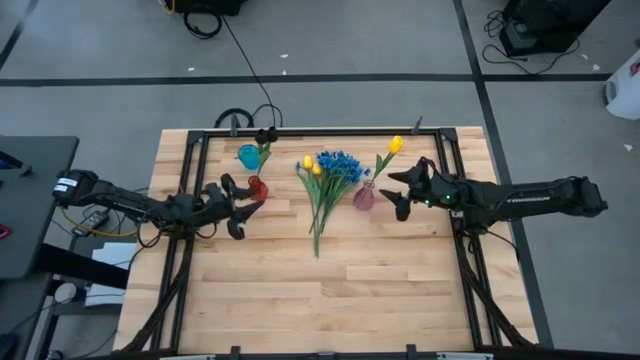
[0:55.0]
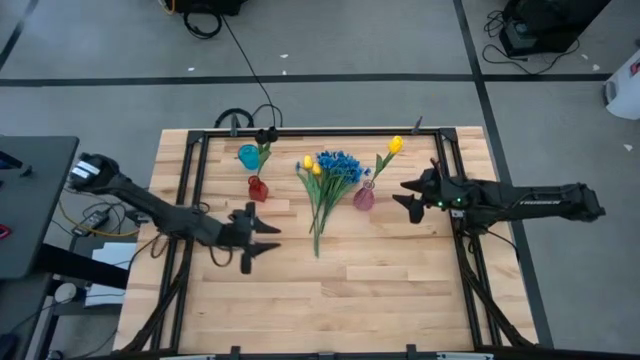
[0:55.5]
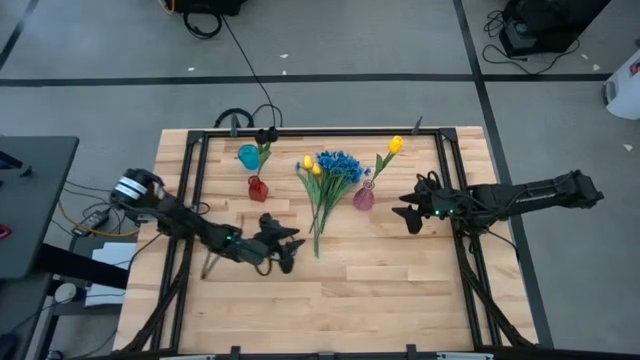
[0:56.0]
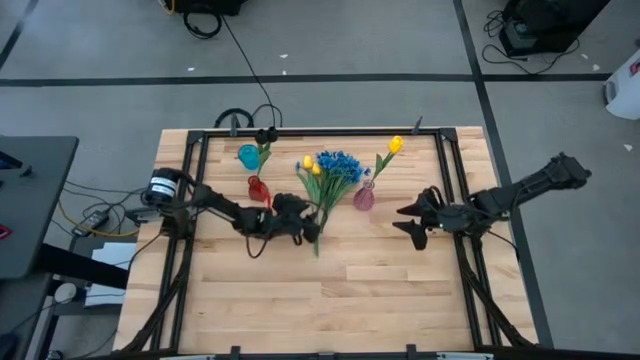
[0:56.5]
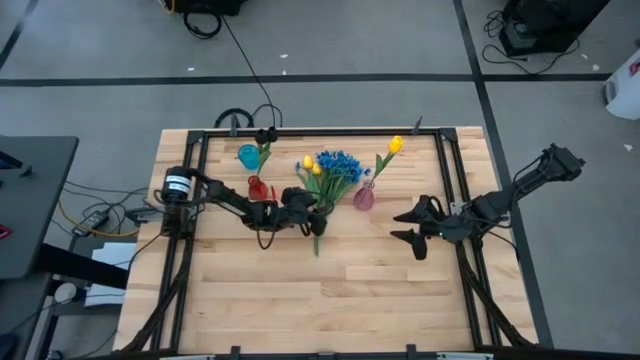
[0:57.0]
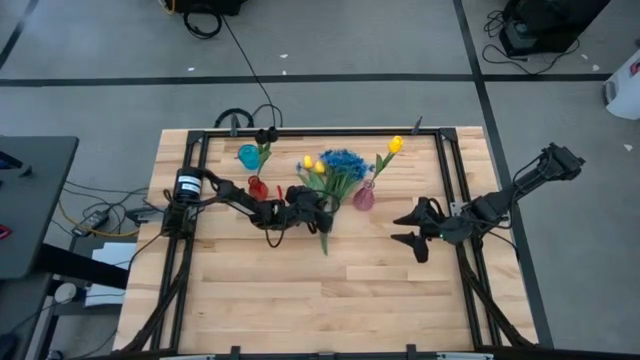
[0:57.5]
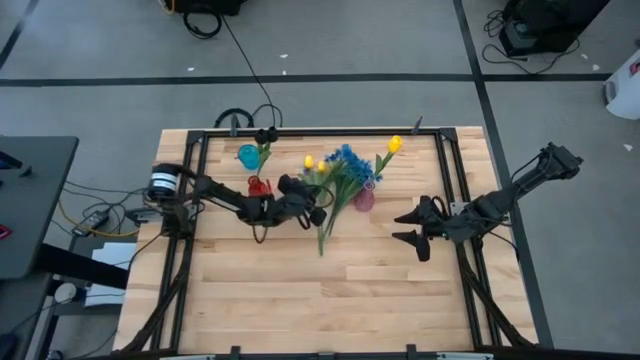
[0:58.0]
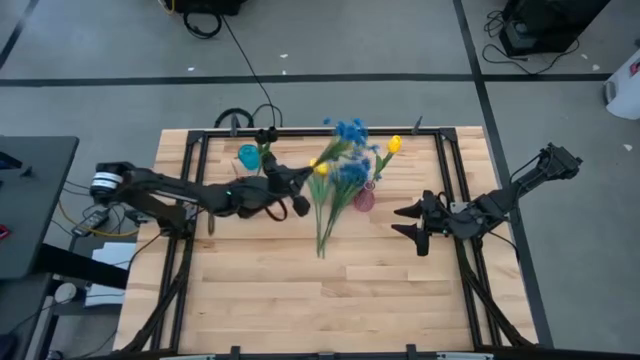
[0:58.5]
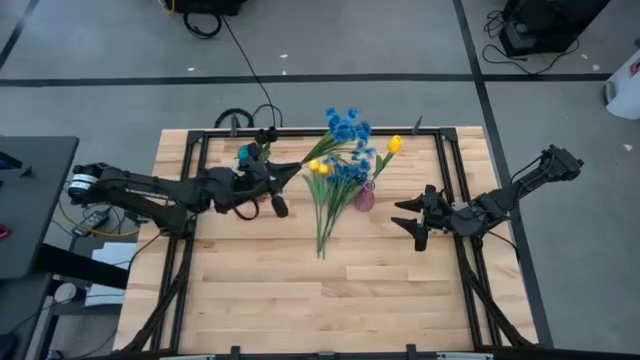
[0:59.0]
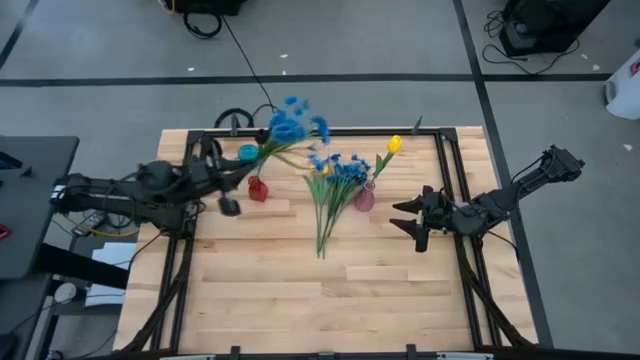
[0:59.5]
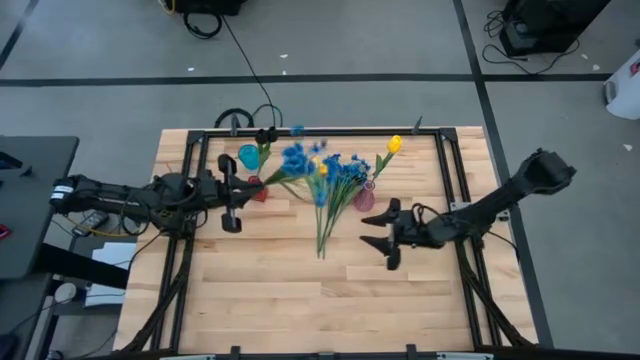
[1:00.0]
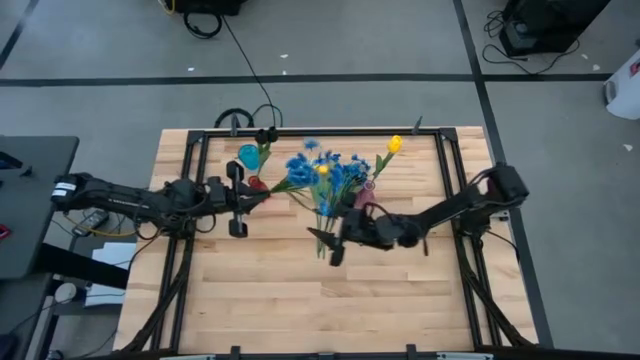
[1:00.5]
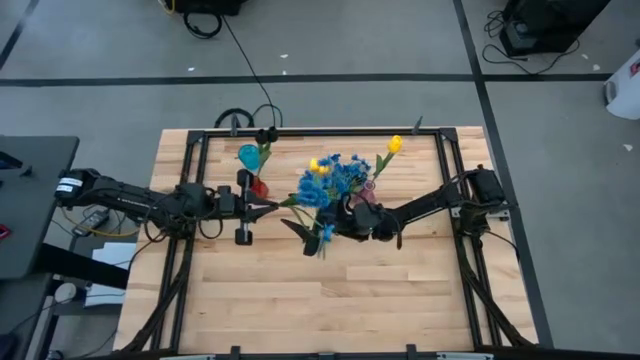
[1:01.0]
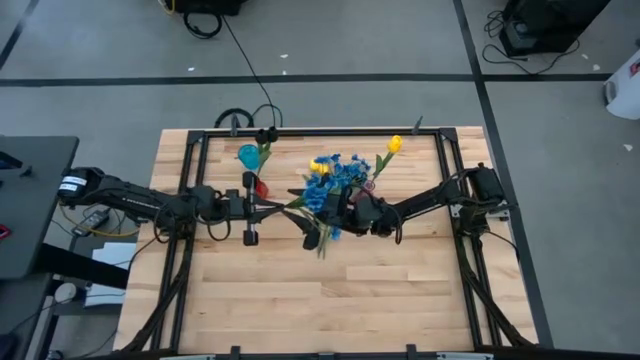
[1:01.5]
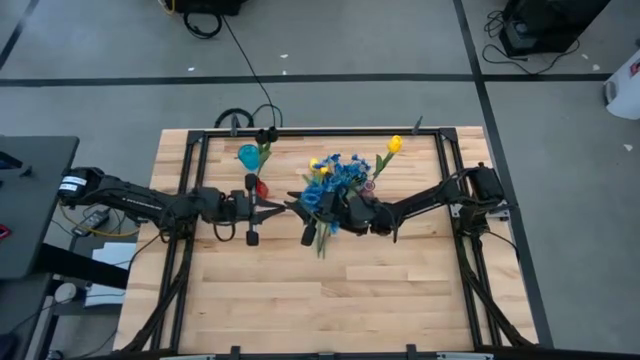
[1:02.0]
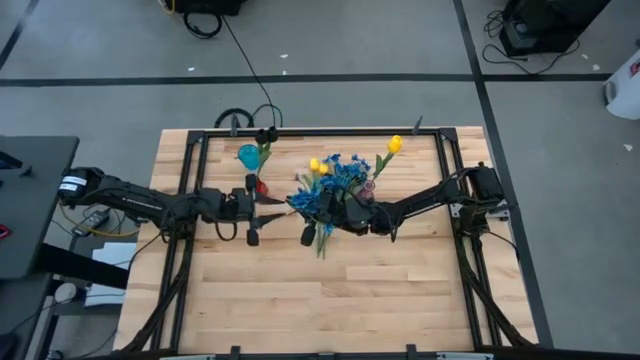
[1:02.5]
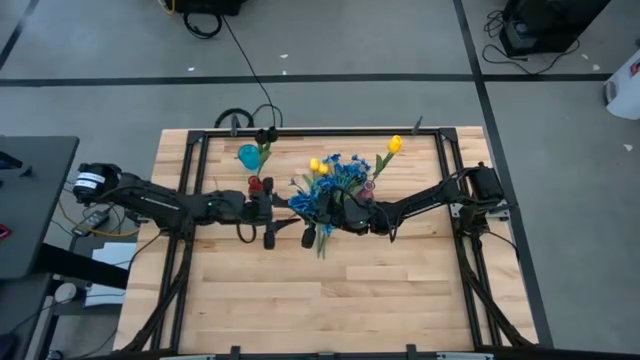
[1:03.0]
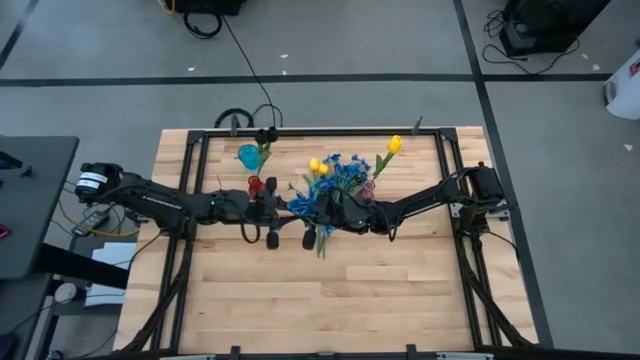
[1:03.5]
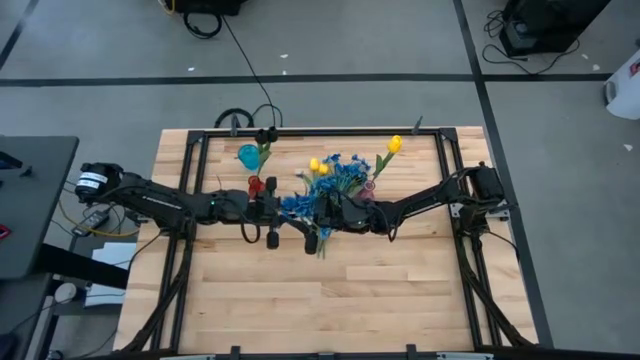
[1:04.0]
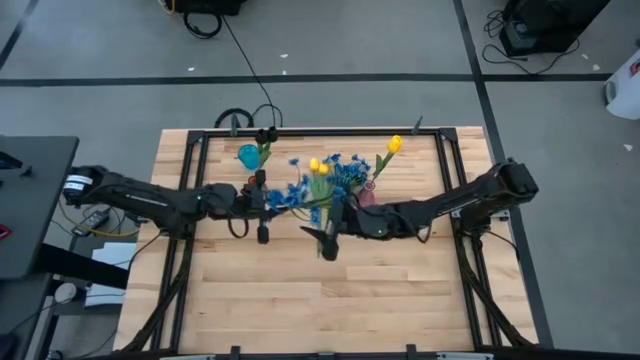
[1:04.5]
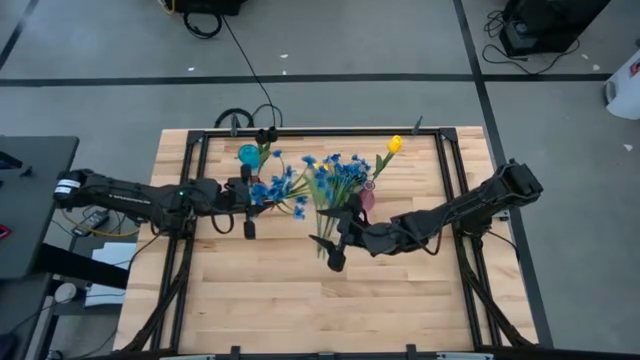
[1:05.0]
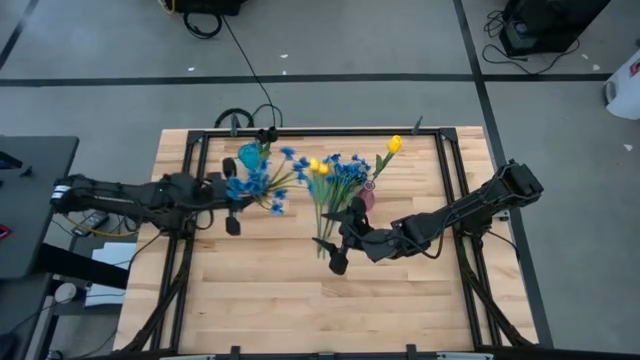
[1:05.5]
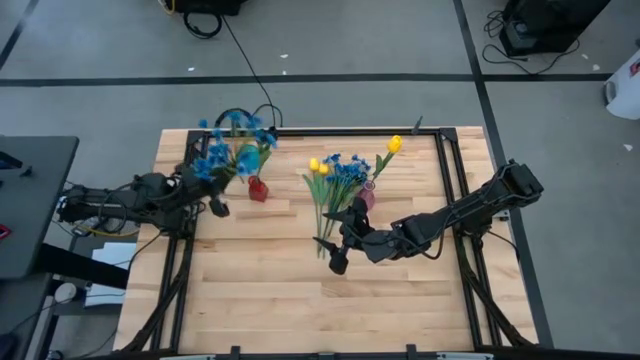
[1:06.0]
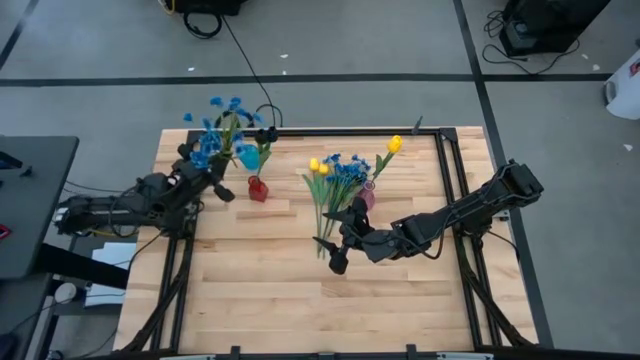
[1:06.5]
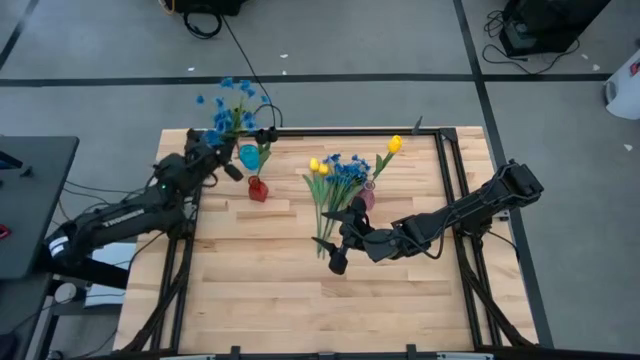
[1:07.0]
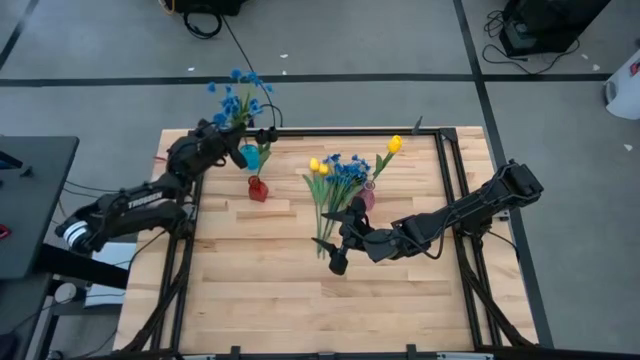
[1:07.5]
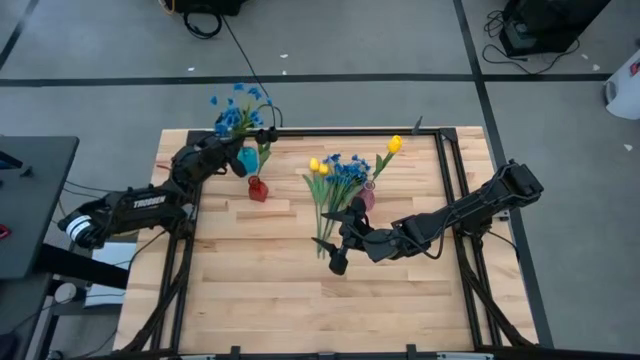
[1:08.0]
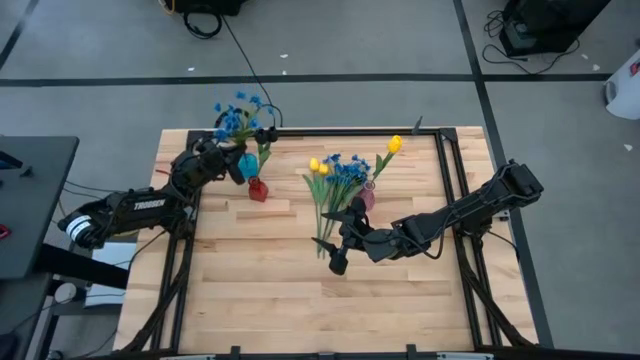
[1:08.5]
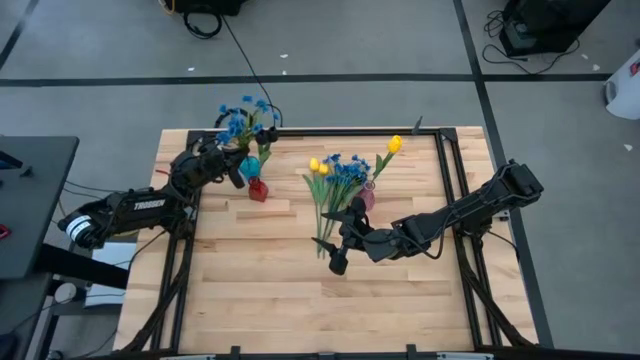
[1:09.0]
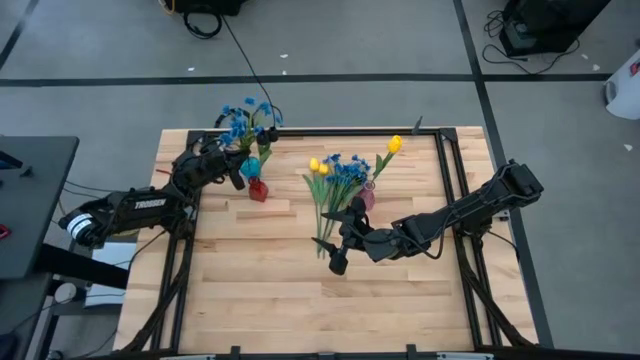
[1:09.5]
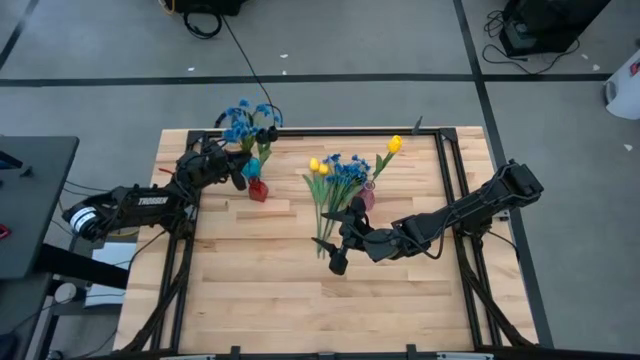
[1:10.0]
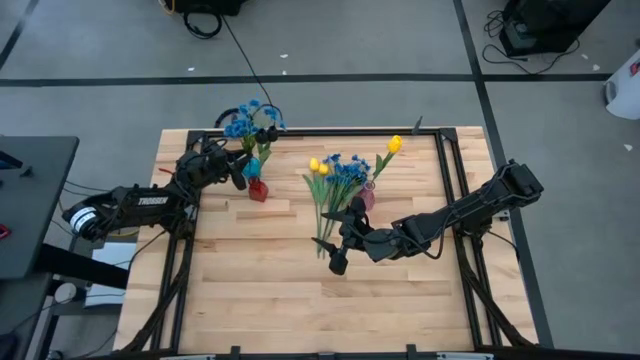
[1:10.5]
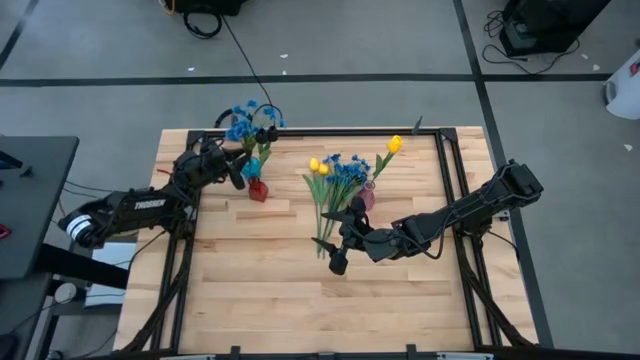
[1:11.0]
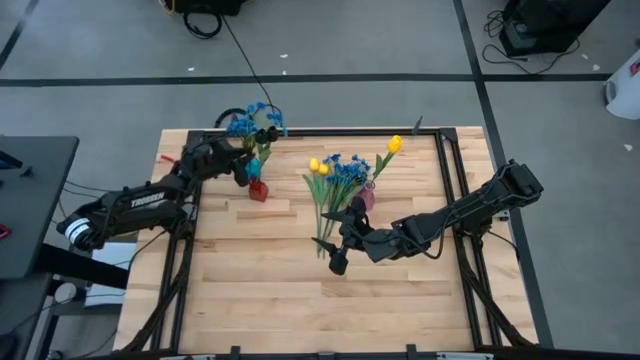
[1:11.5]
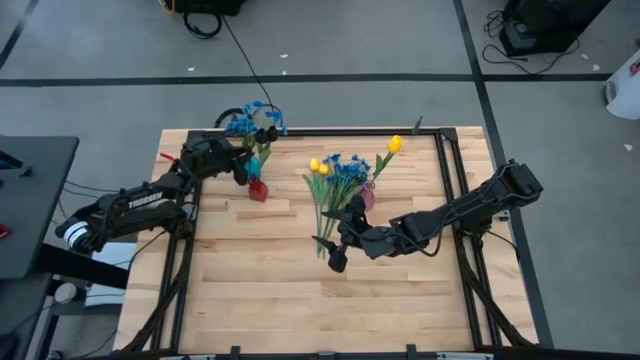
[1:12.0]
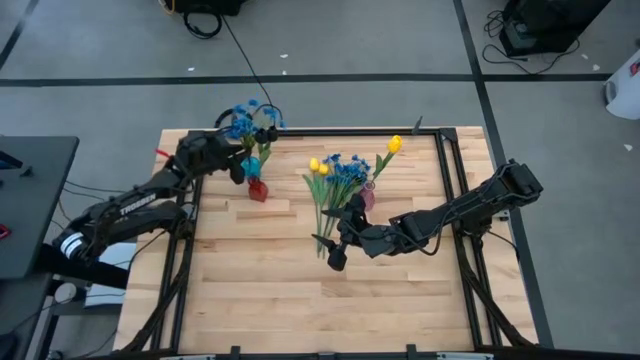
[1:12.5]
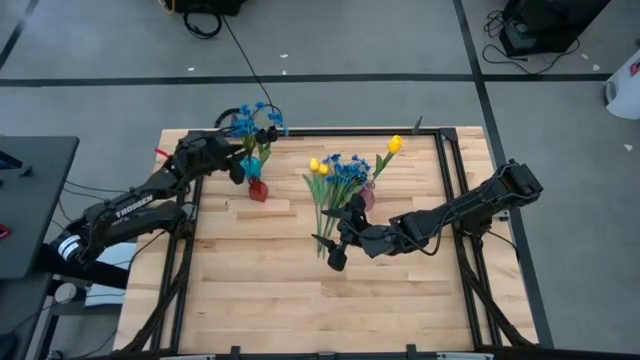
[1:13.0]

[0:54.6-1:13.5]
Task: Sort flowers into vase by color
Put the blue flower into the blue vase

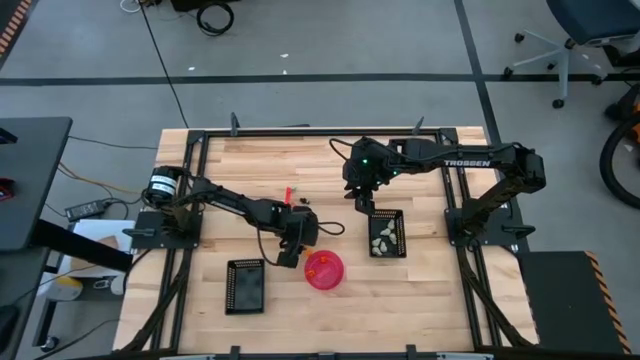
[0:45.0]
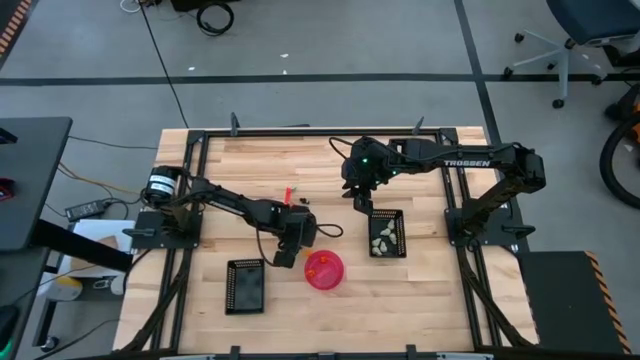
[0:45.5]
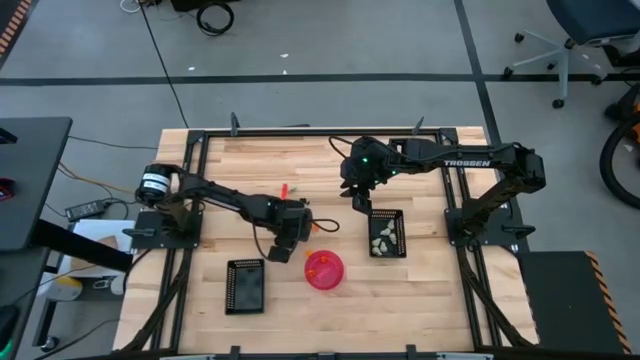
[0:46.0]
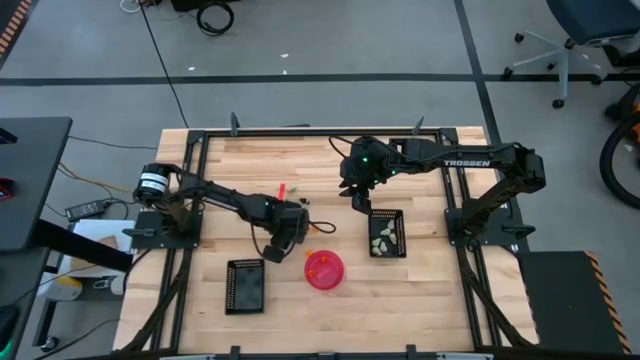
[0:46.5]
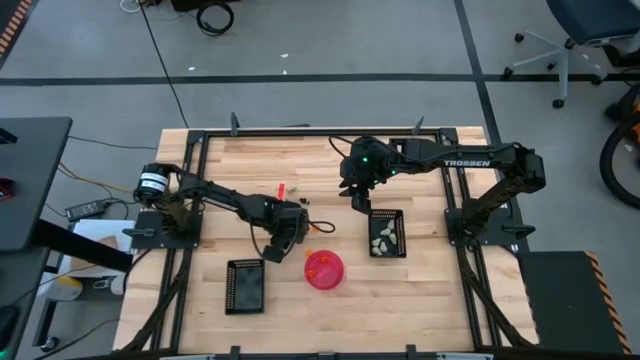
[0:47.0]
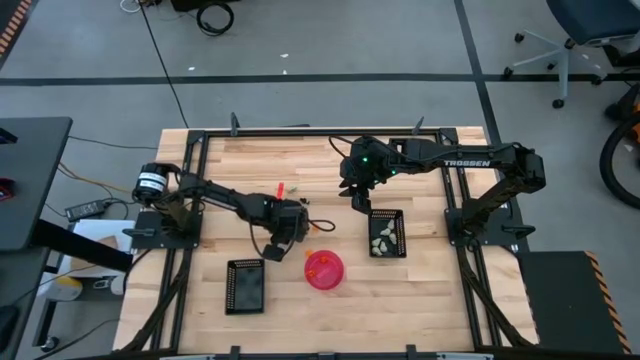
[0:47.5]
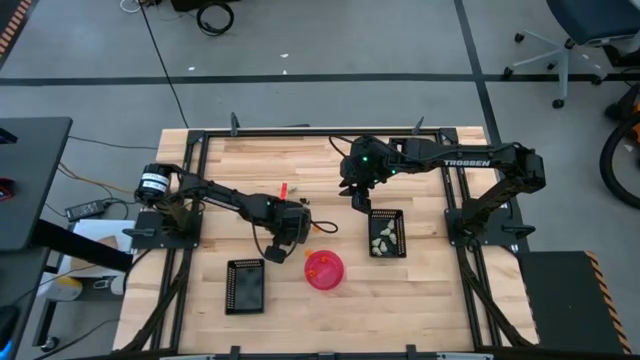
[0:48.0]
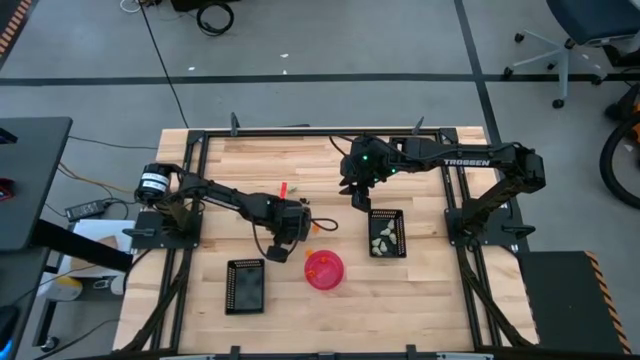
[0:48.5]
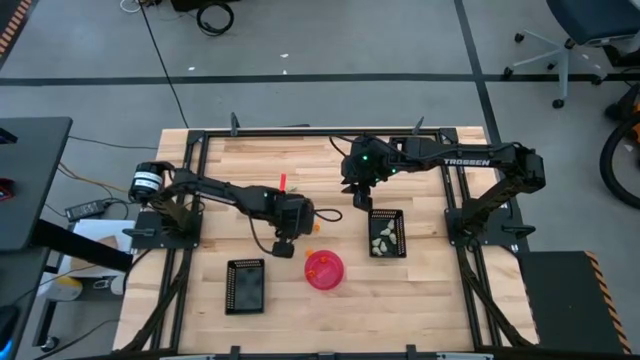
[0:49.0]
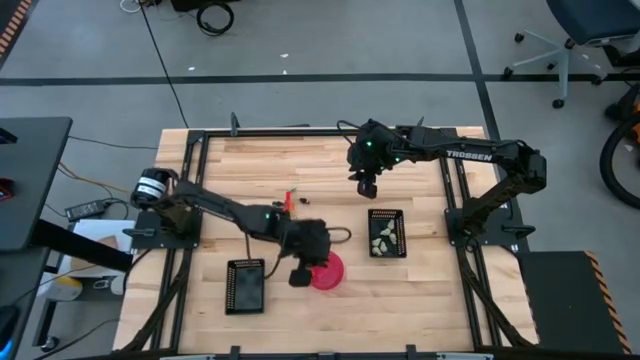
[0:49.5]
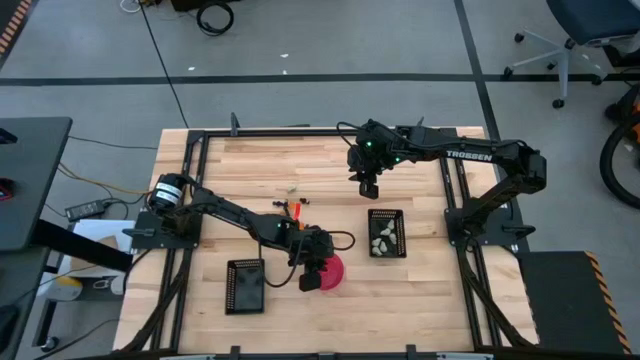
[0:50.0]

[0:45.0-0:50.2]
Task: Sort Halloween decoration
Put the orange pumpkin toy into the pink bowl
